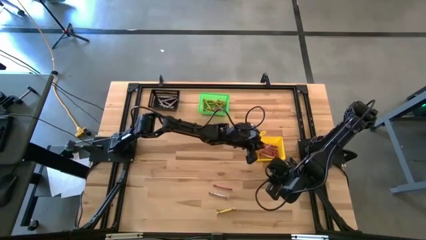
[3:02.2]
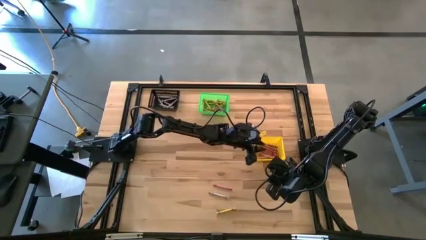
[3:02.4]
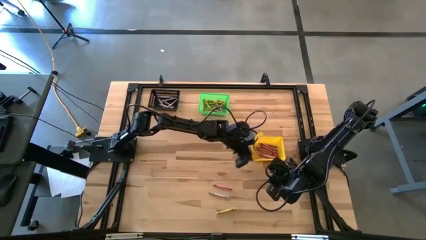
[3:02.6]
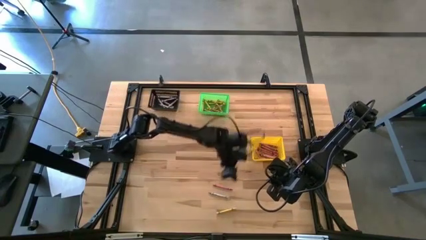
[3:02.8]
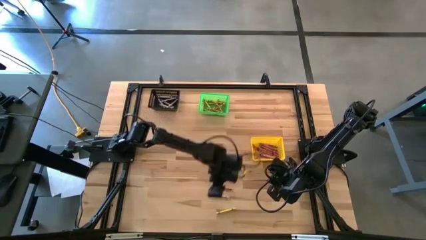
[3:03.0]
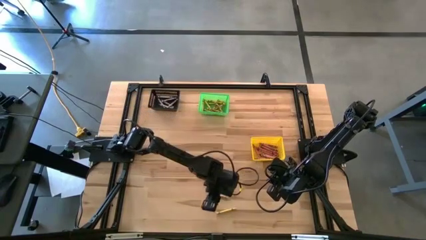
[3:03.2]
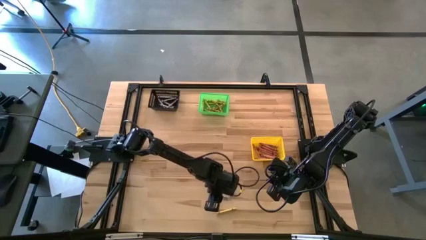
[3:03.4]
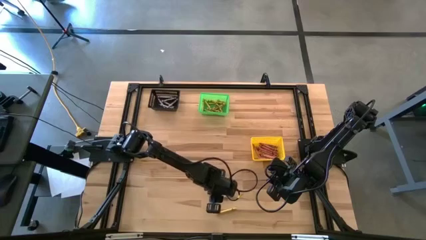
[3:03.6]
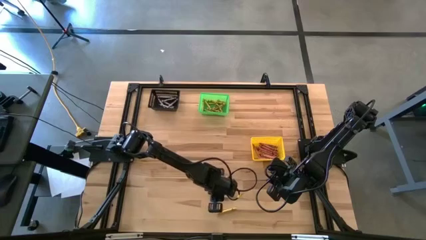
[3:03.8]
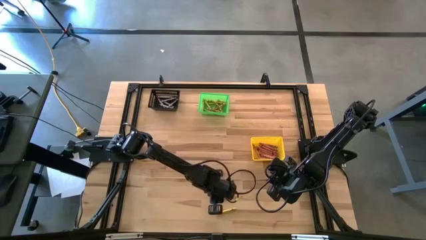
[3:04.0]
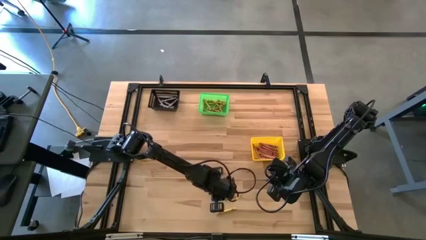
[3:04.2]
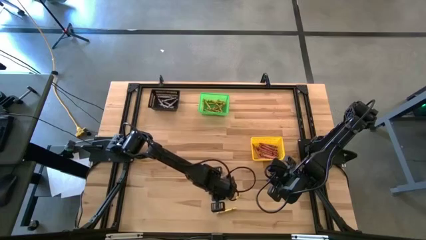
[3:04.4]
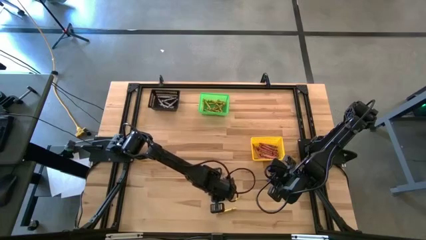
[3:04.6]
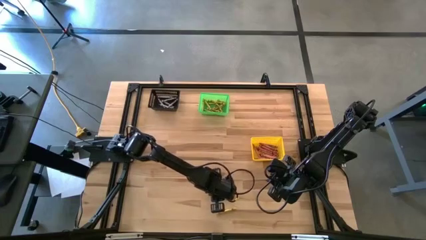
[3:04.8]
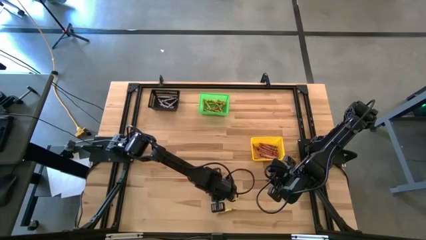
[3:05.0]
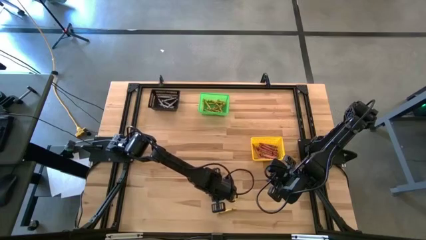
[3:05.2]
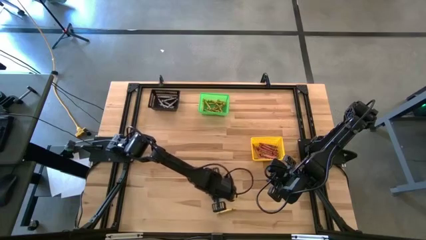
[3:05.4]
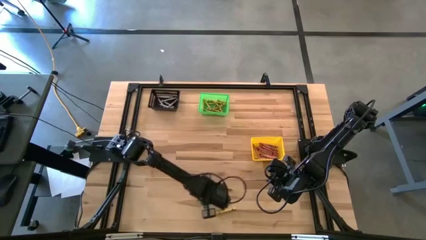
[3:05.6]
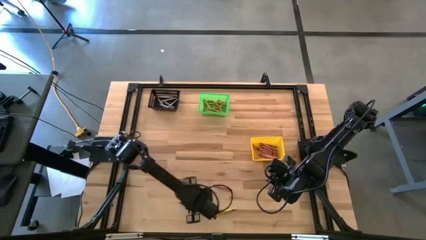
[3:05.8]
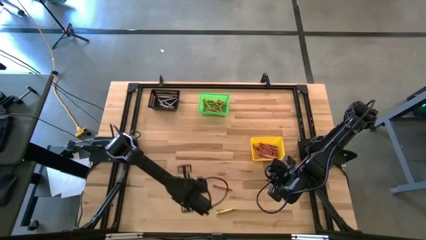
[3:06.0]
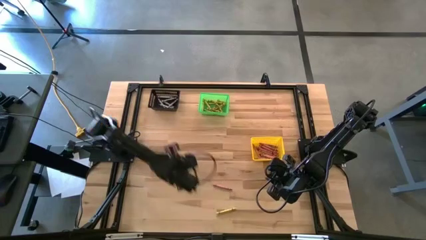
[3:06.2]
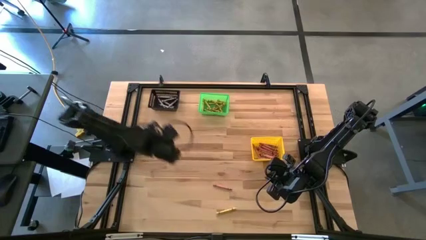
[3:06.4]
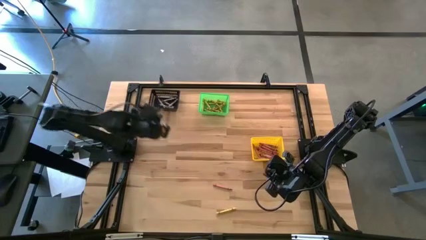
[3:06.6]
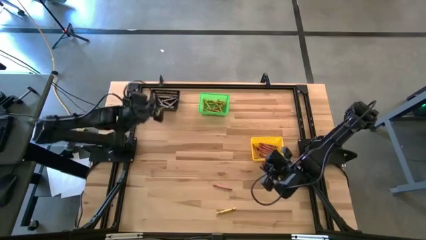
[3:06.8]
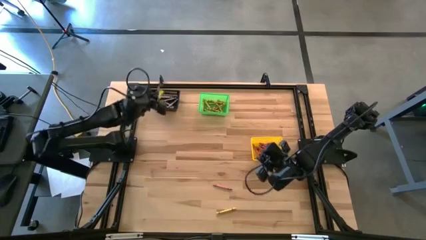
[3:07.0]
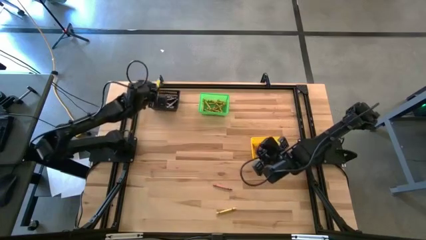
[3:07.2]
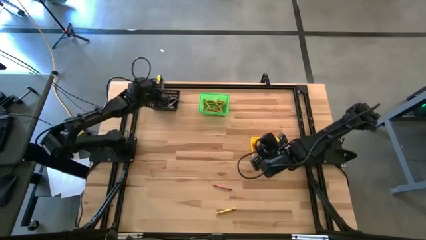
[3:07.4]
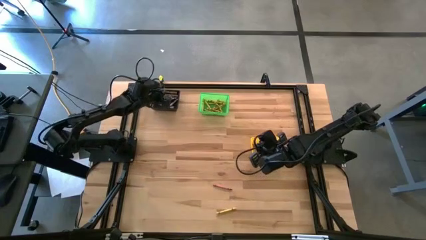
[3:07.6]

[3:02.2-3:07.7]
Task: Sort crayons
Put the gray crayon into the black basket

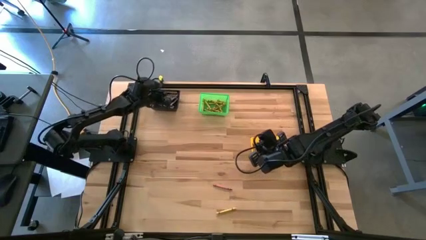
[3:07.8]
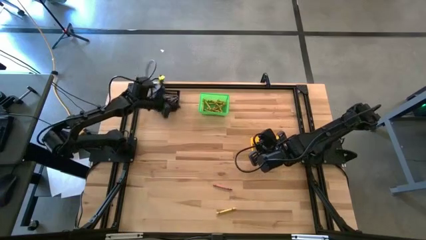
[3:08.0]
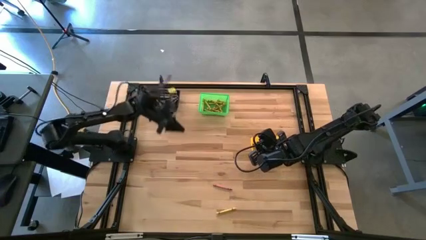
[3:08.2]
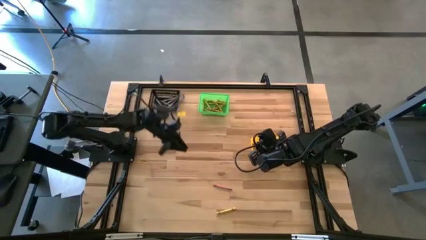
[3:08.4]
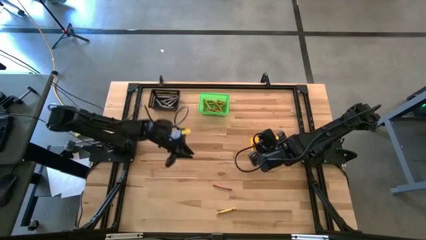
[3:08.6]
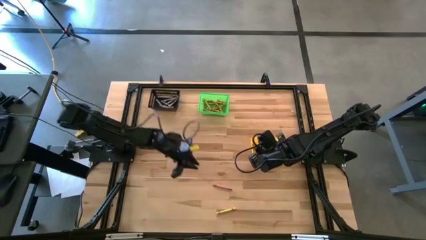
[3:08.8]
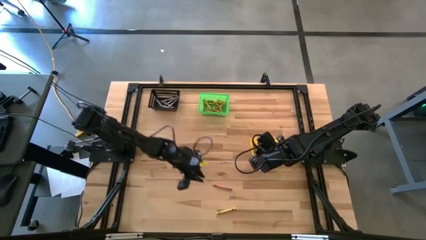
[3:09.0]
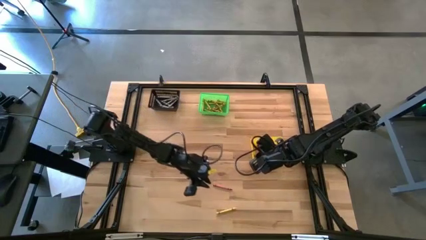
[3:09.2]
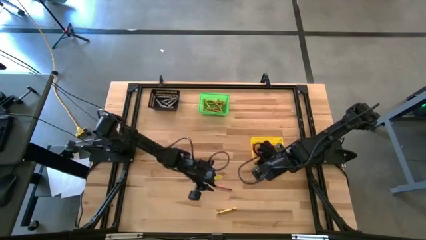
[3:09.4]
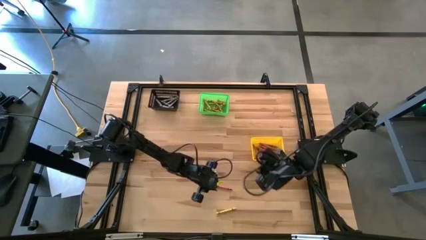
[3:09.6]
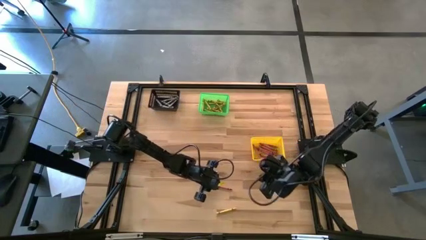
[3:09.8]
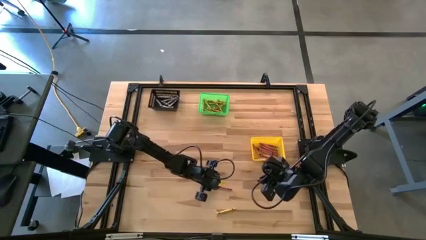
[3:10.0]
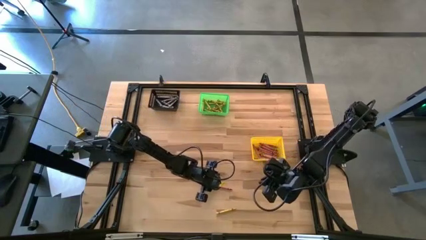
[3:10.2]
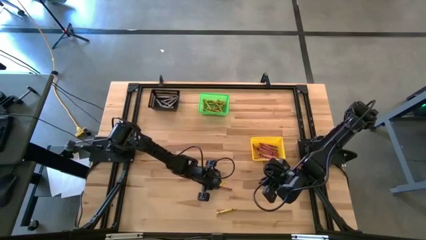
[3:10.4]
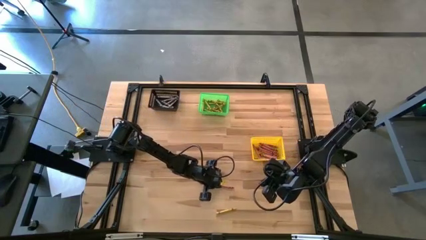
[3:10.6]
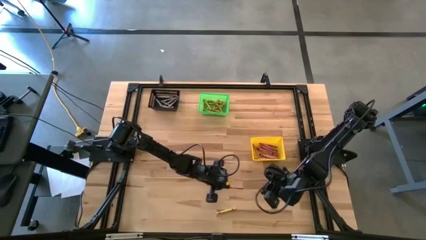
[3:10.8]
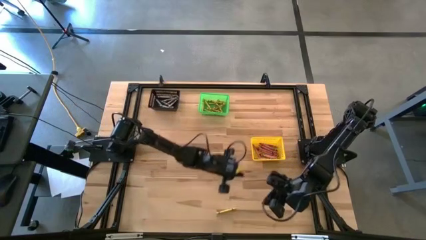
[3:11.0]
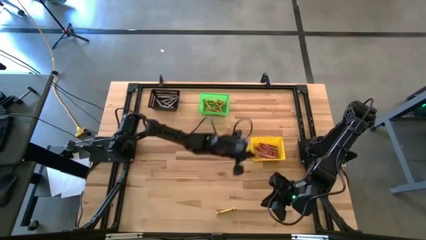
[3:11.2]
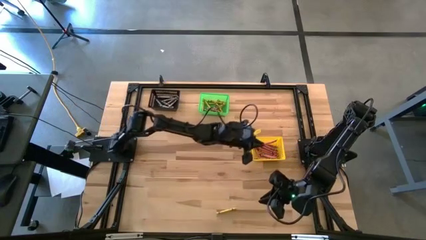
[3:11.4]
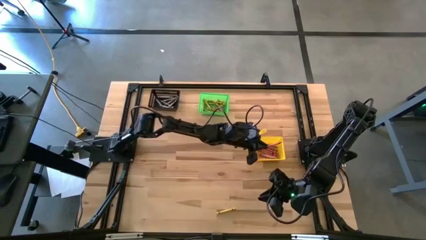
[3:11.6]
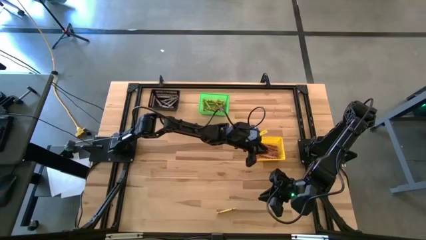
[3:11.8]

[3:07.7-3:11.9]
Put the red crayon into the yellow basket

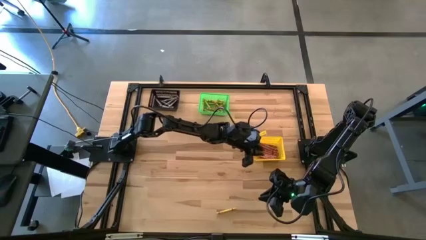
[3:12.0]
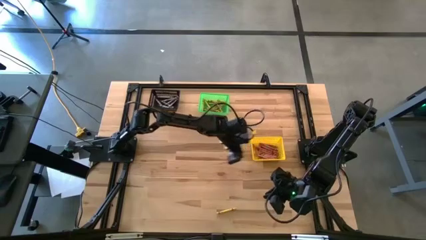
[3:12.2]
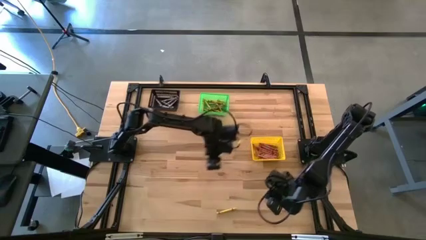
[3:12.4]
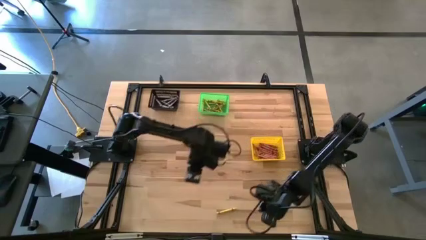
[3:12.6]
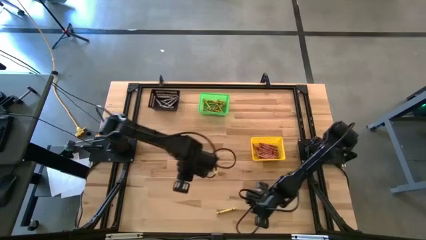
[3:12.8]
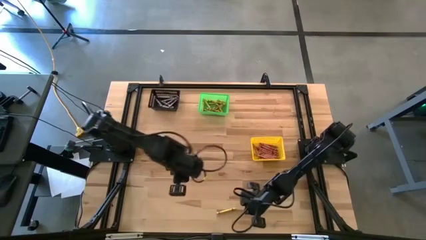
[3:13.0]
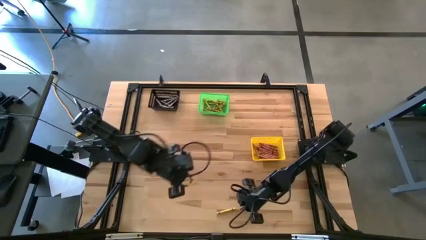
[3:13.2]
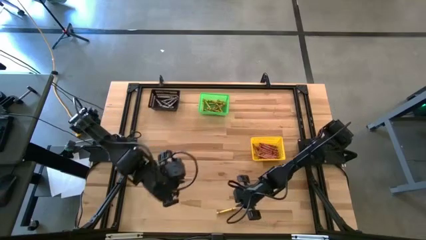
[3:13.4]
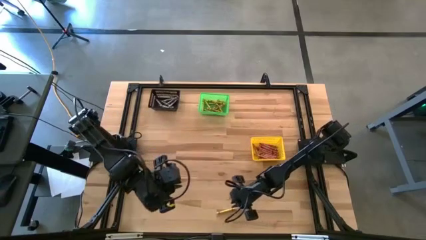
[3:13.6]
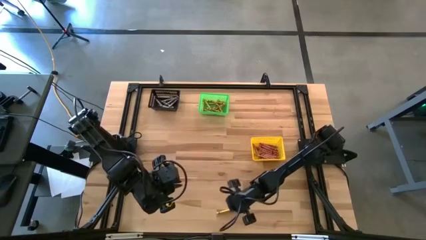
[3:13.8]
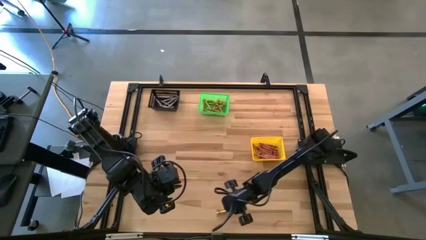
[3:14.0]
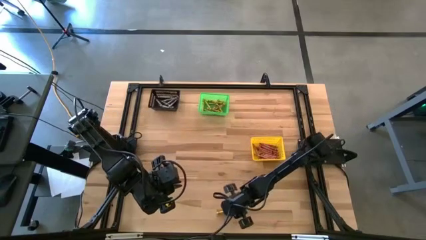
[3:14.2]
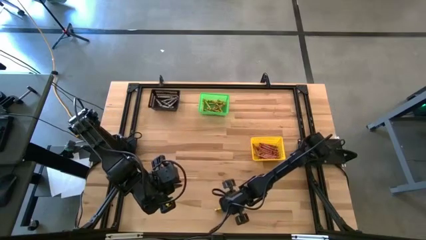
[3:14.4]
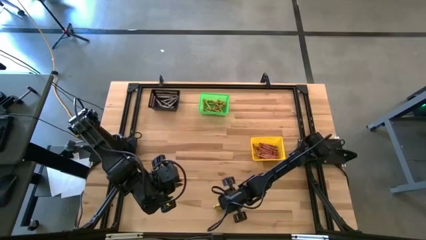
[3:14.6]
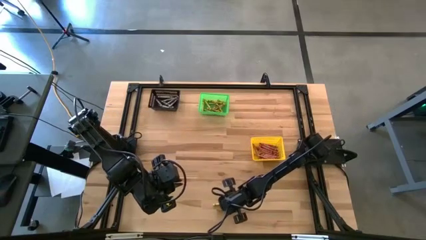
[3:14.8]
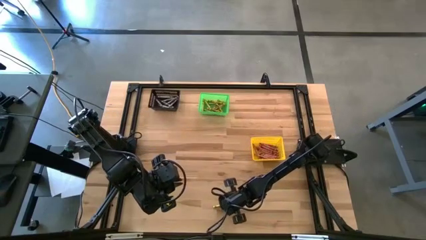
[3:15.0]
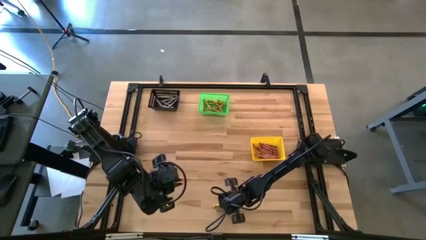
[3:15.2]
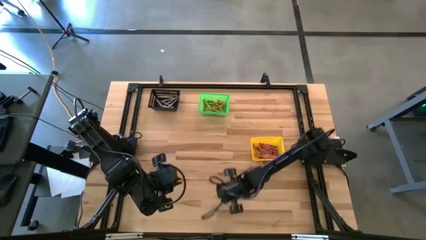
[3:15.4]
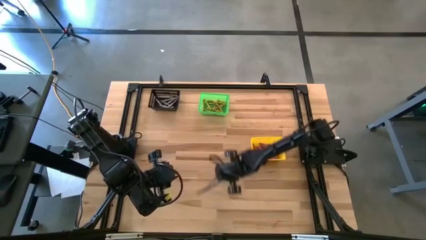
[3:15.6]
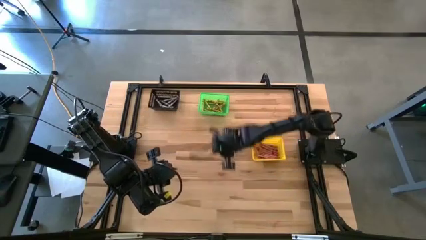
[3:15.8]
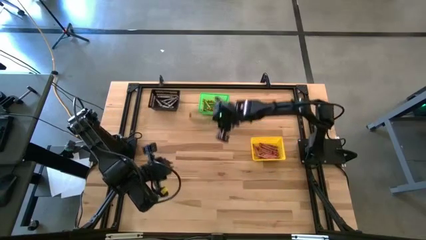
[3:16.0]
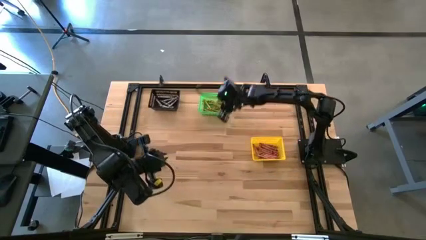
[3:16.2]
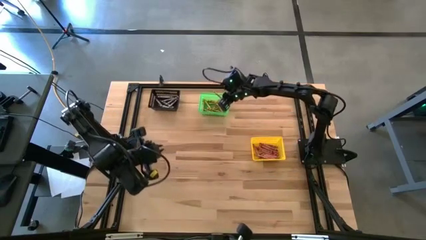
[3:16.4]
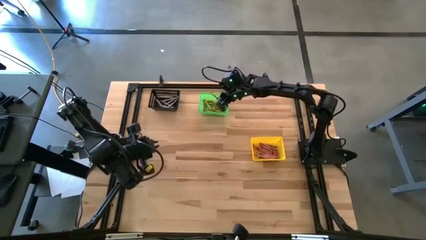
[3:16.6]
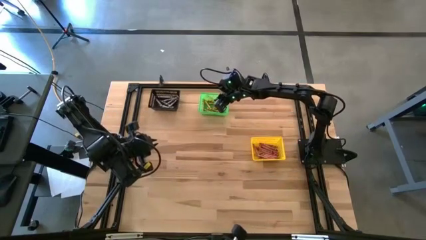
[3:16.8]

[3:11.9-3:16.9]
Put the yellow crayon into the green basket

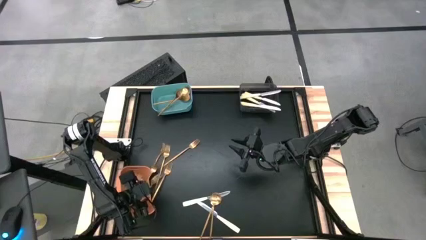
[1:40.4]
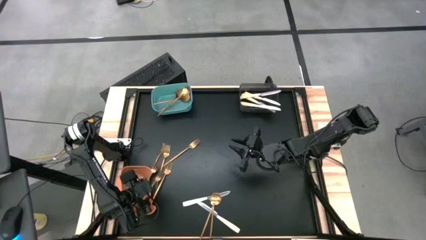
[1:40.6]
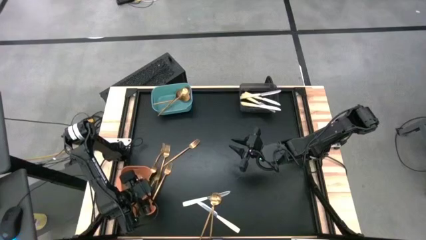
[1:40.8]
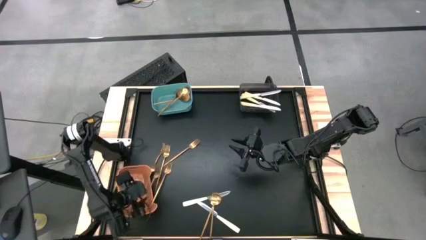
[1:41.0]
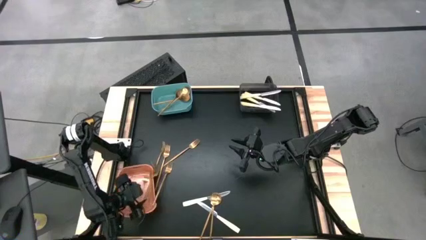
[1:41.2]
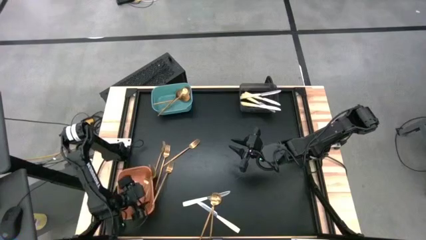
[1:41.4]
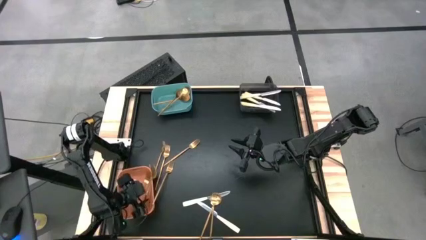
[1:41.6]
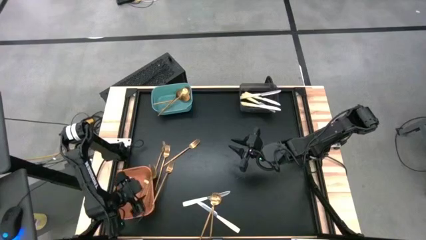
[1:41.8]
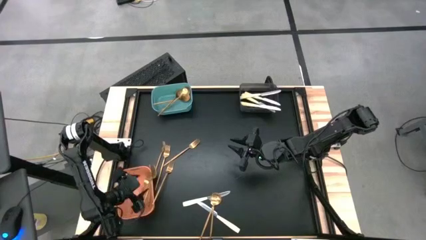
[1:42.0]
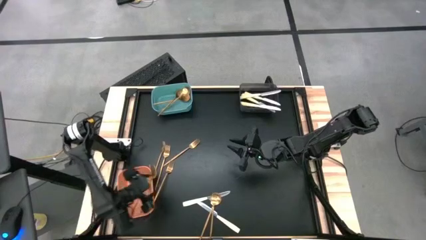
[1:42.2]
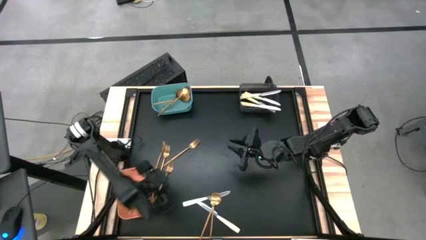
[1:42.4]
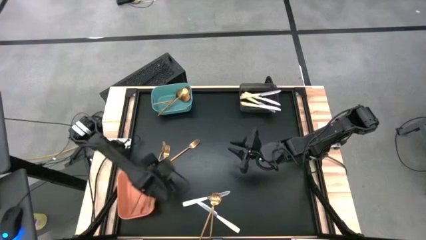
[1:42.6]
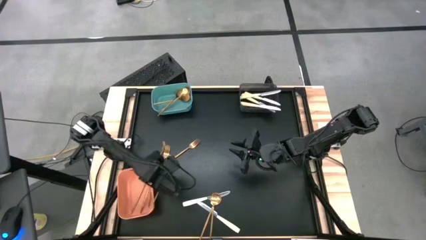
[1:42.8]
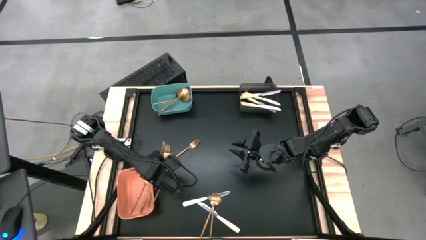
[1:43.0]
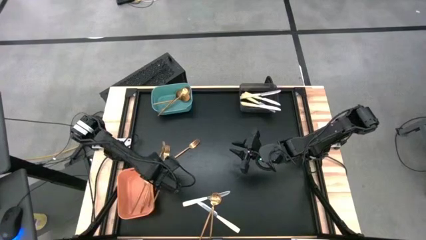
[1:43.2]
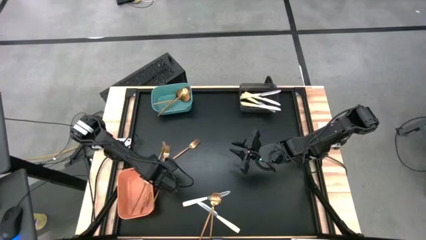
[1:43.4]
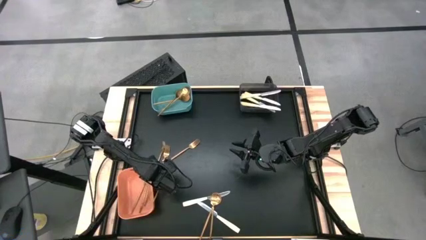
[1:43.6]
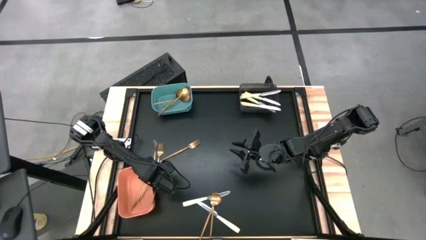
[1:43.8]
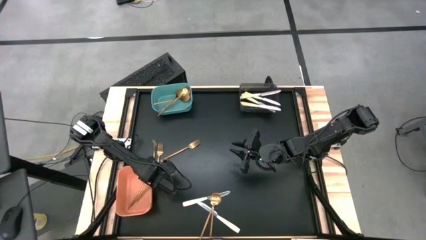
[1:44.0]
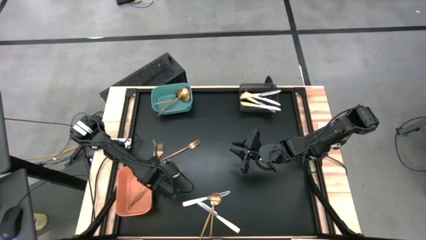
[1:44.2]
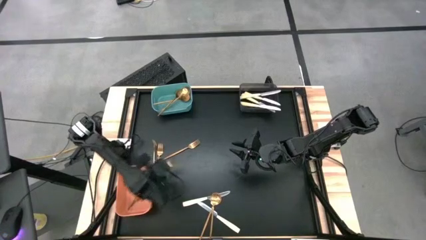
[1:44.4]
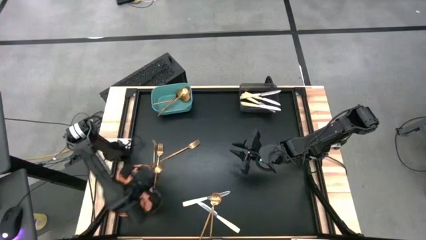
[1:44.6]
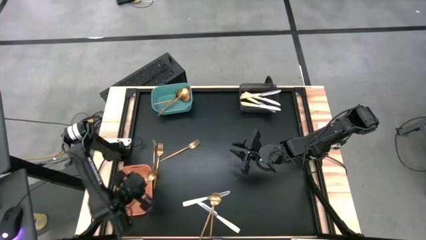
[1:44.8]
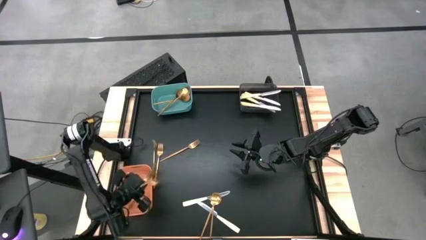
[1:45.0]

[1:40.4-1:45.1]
Task: Sort silverware by color (type)
Put the gold fork into the orange bin
